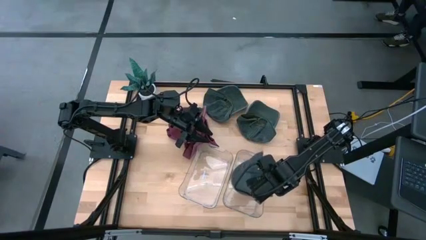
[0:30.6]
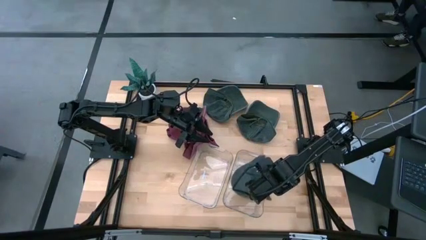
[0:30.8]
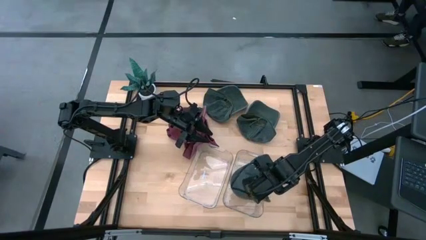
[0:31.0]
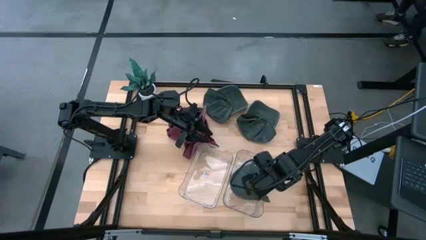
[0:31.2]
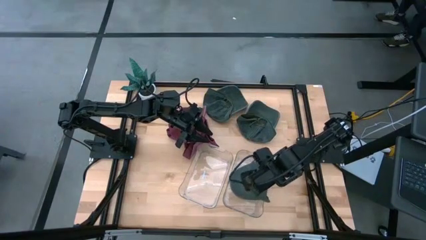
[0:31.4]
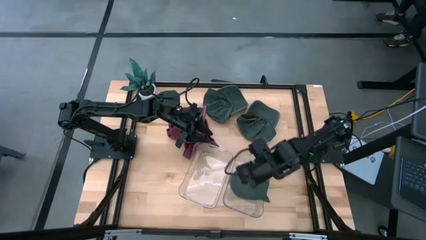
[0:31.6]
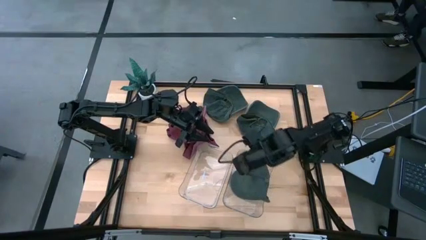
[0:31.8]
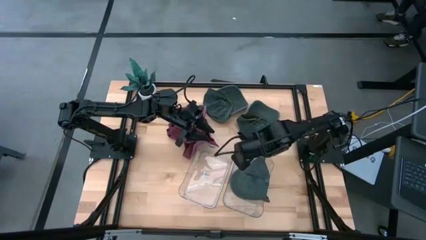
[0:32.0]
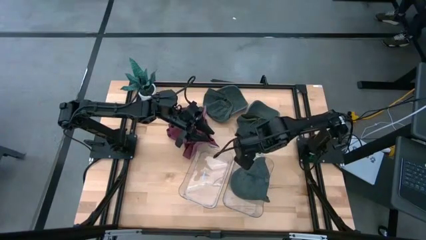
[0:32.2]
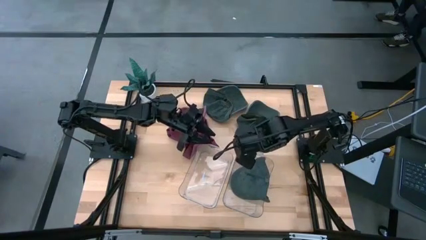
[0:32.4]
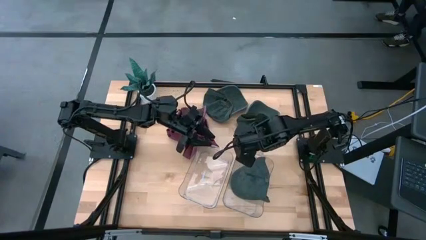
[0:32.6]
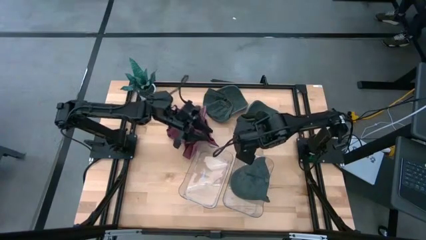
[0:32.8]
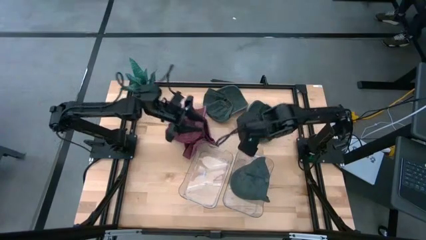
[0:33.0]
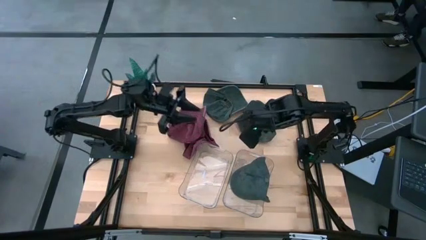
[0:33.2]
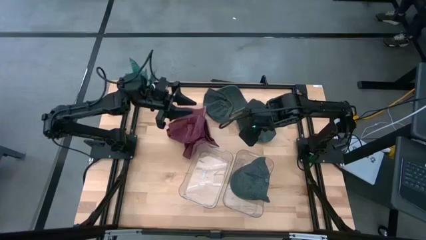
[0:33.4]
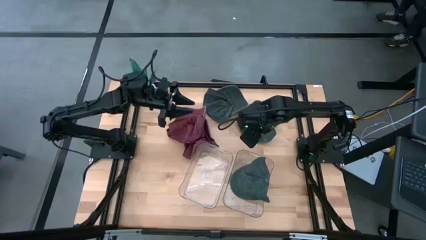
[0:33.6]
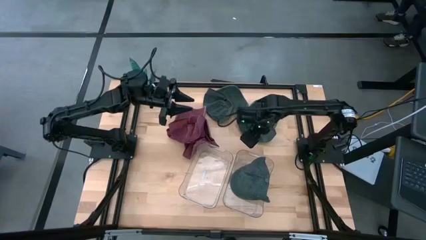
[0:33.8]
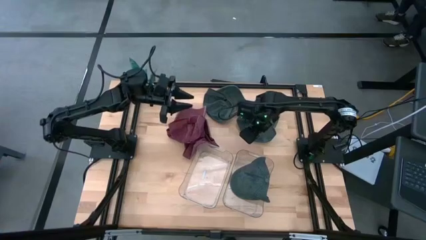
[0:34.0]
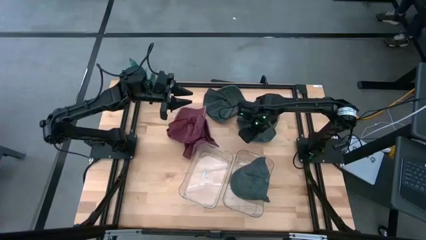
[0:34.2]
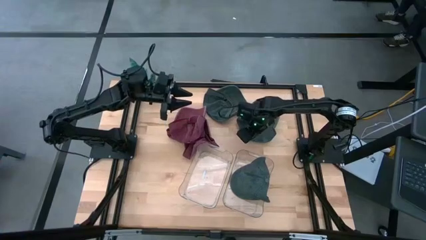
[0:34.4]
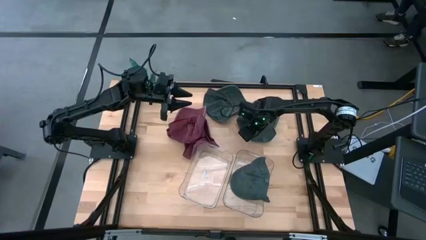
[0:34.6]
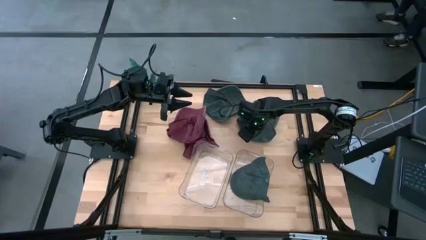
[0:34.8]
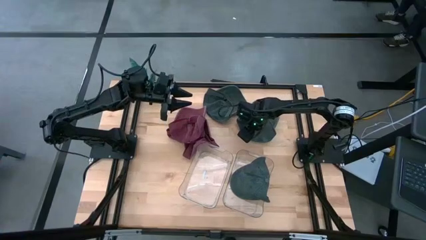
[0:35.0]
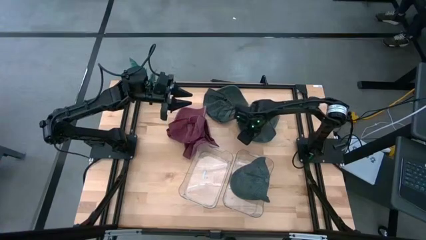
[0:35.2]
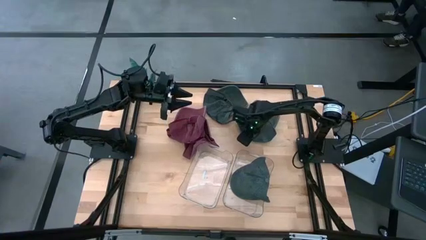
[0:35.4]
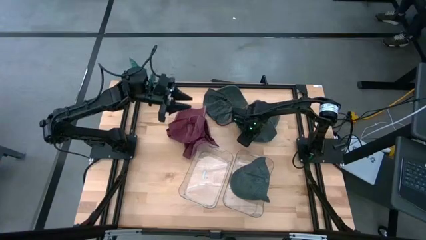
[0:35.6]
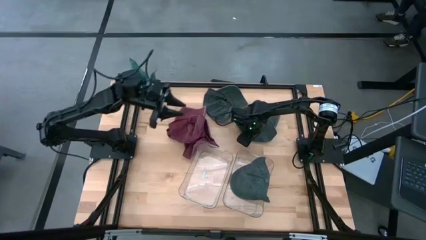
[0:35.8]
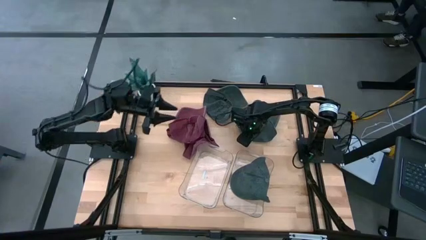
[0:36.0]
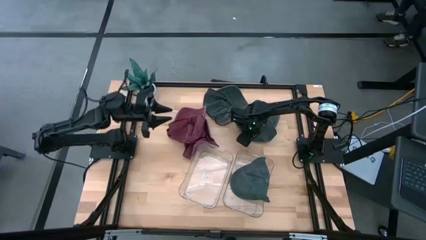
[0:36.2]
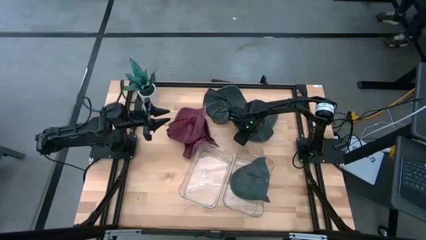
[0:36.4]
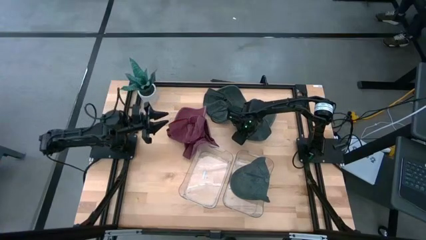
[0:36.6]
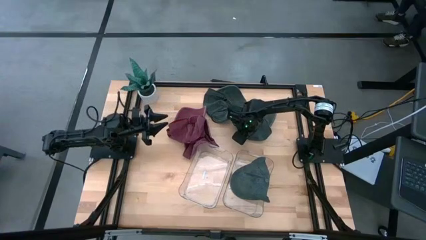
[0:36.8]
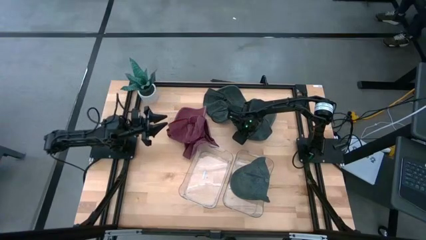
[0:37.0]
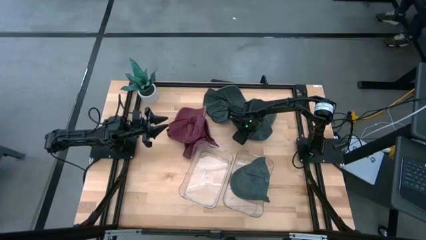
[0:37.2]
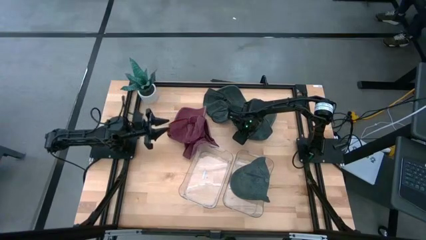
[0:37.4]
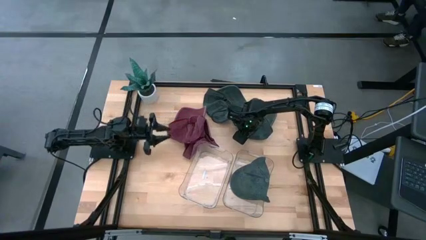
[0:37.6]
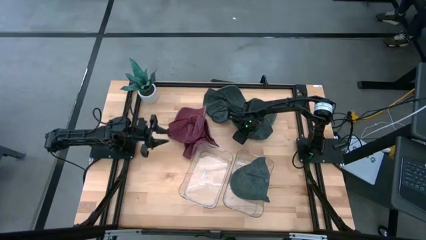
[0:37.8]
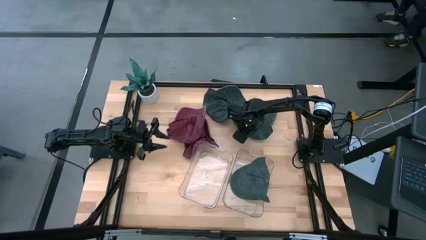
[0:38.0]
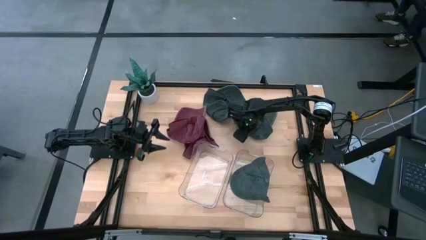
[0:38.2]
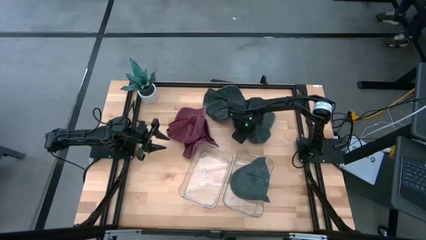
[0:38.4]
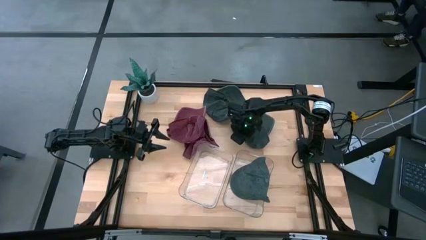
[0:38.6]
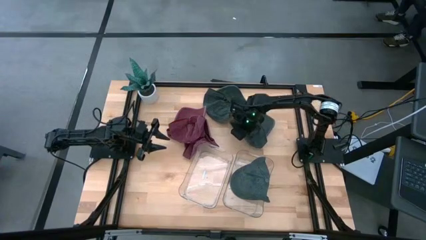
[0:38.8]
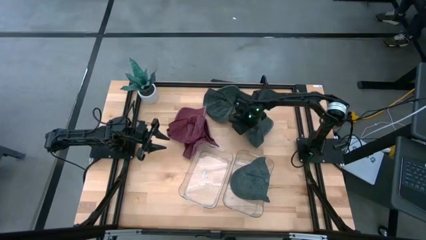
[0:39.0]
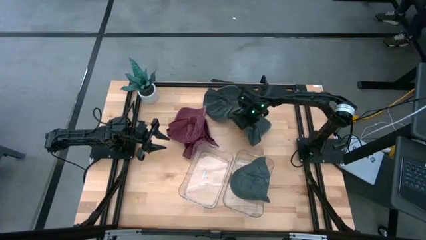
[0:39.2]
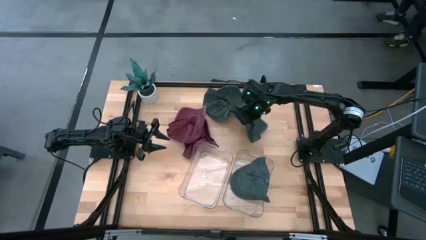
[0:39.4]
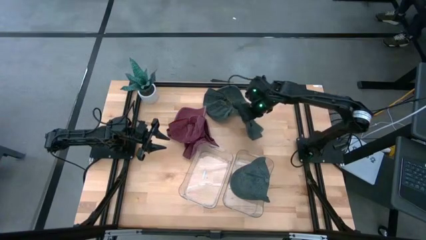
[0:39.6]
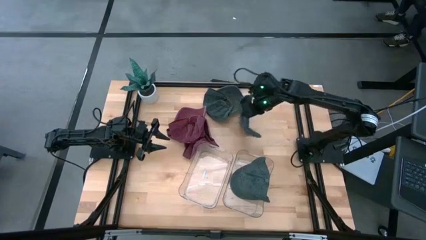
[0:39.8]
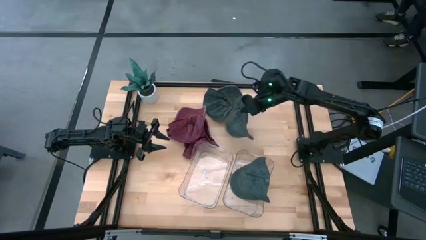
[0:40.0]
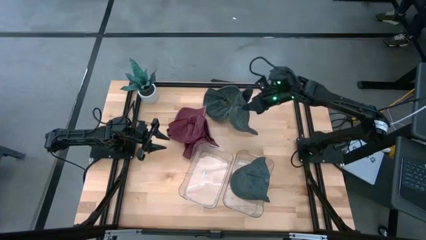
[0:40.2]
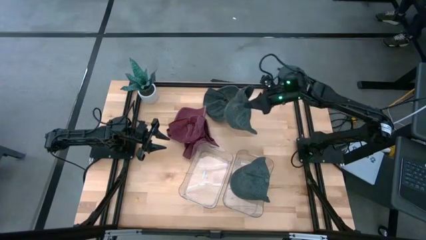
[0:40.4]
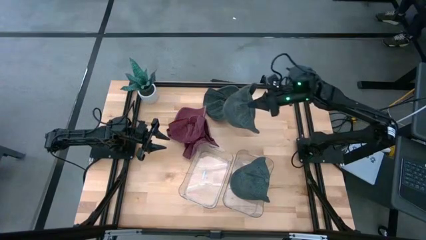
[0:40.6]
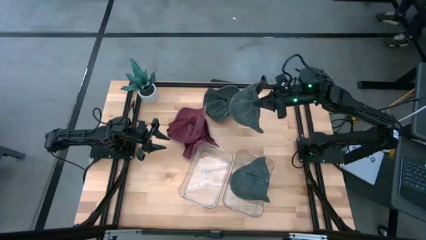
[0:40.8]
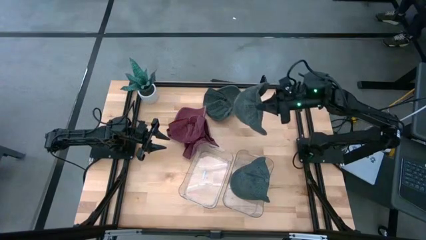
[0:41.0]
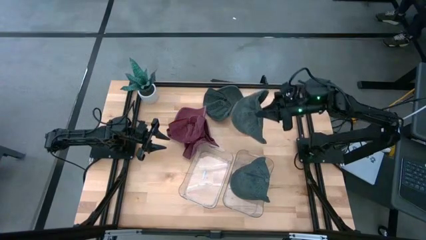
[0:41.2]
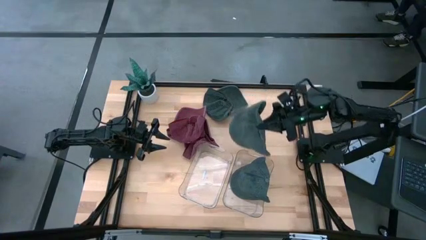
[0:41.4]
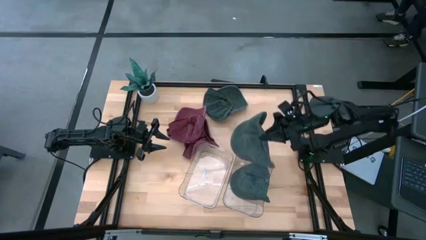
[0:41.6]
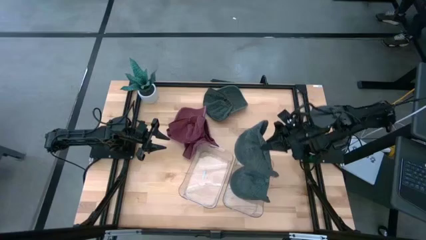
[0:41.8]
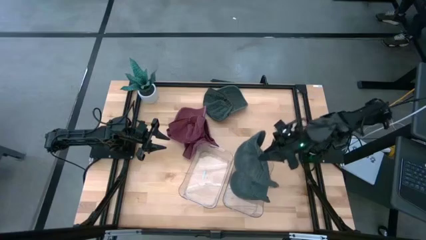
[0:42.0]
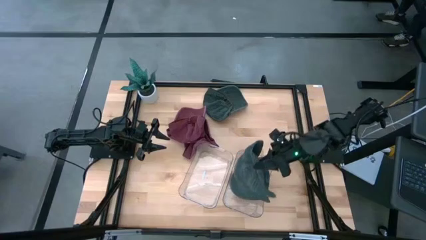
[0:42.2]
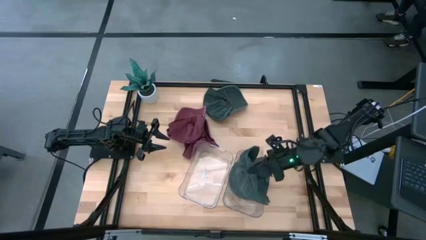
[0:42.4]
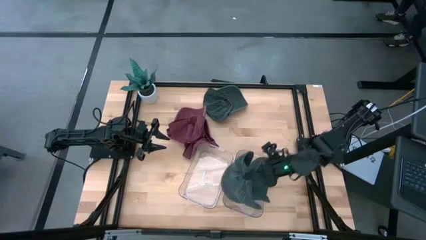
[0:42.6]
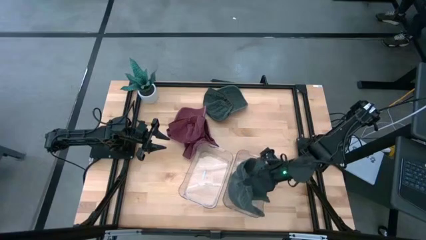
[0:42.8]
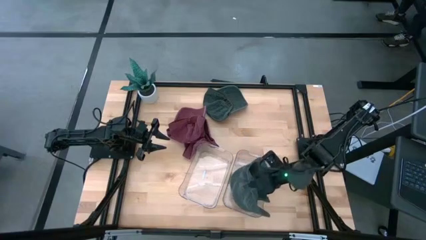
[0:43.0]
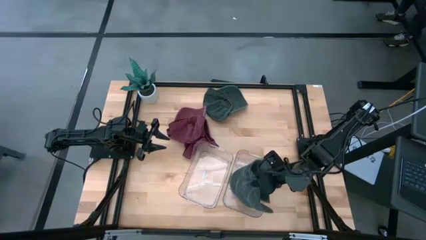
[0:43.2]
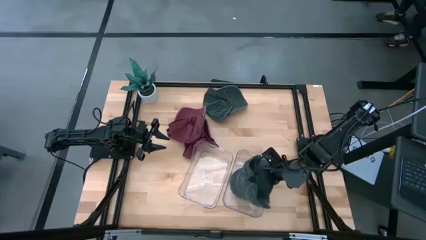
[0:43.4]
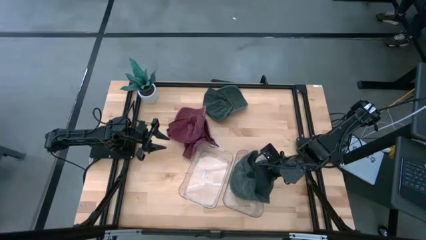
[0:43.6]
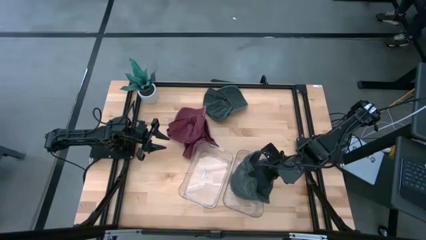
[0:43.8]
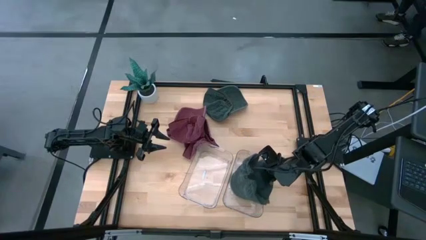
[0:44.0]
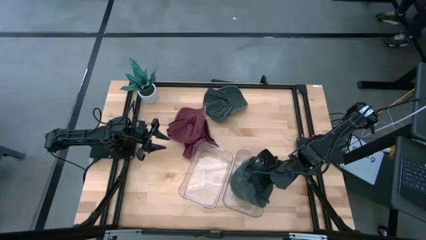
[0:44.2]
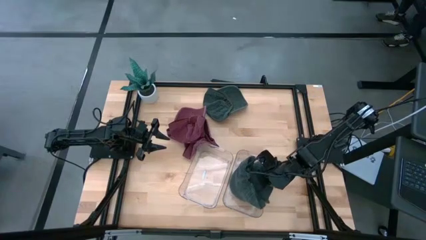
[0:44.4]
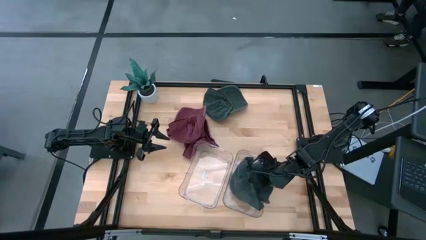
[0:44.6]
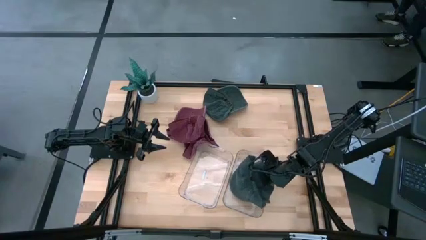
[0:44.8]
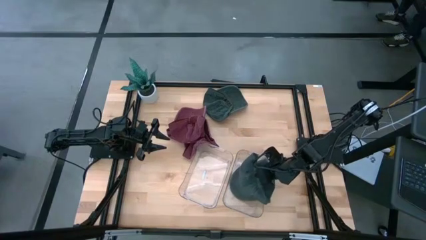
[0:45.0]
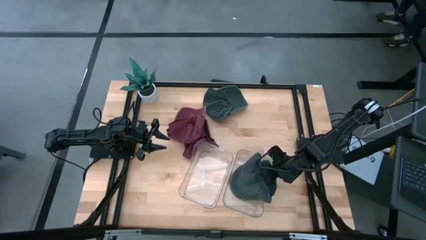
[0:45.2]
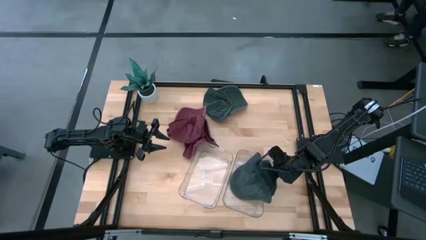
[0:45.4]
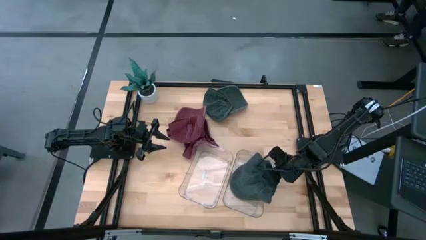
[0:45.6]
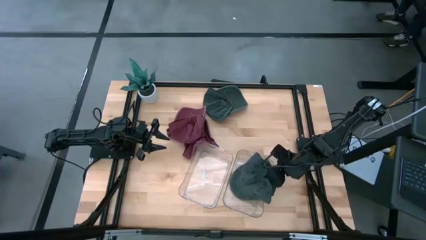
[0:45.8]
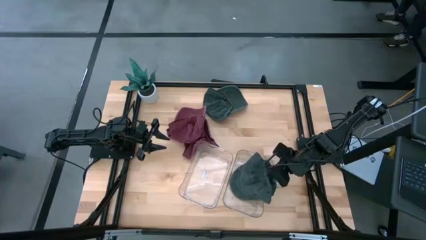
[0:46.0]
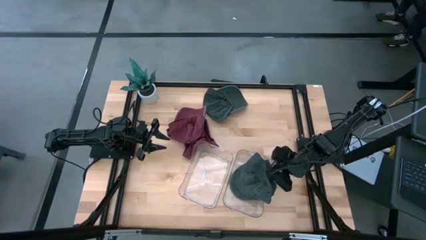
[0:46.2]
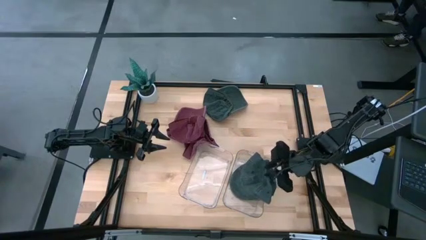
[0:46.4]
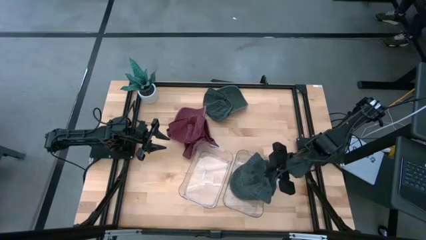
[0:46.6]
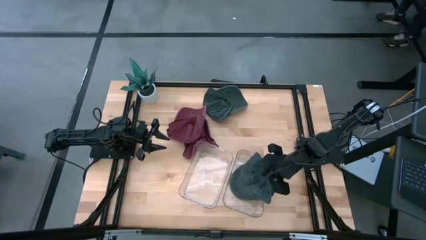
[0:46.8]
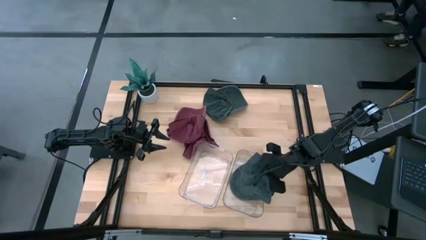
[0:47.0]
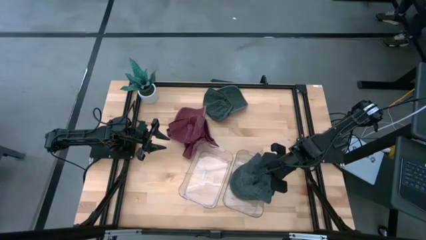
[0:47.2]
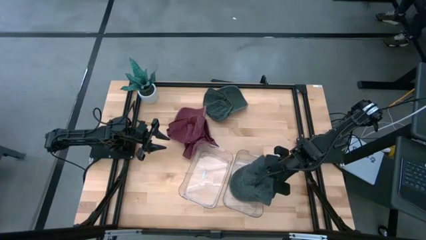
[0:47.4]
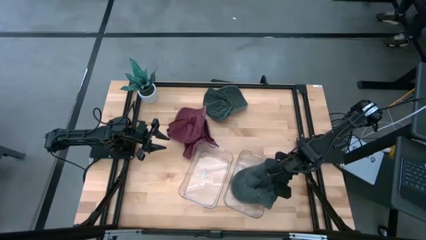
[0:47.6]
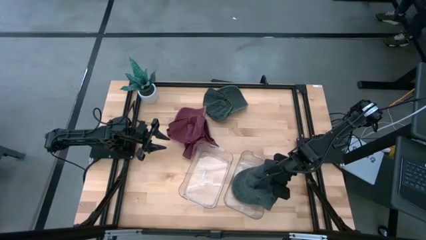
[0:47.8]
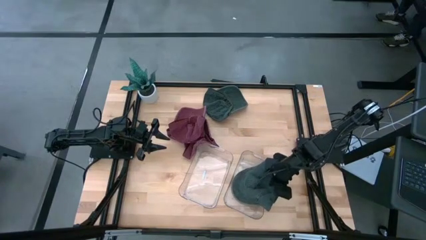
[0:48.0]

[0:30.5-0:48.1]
Task: Pick & Place hat
Put the bottom black cap into the right transparent bin
